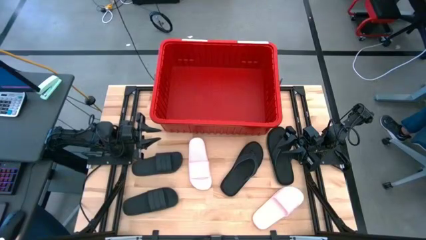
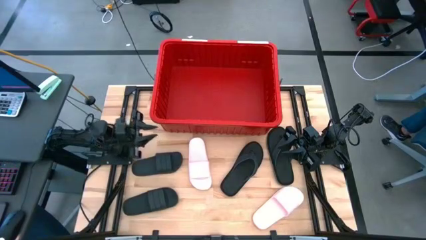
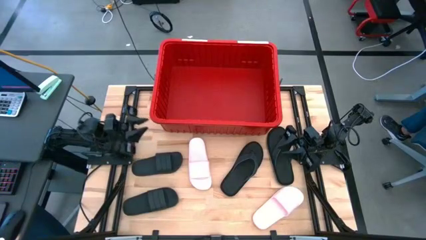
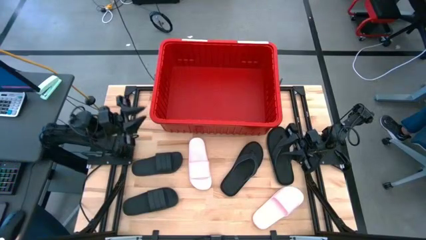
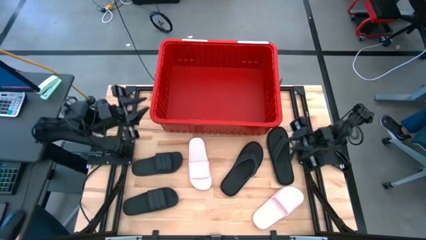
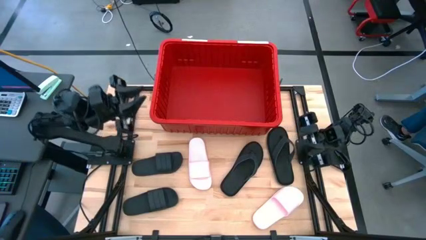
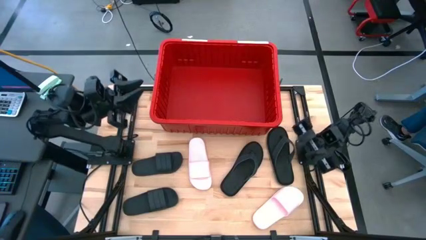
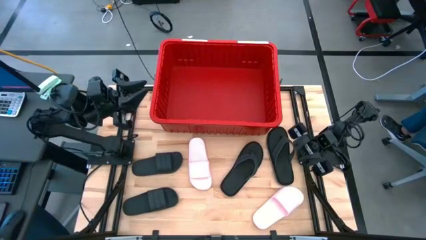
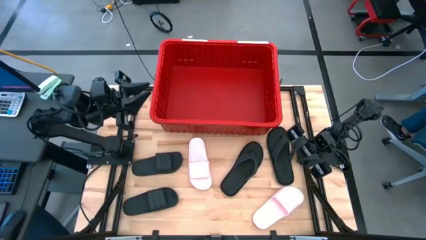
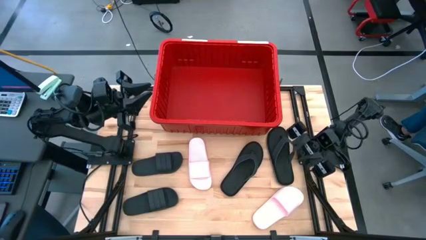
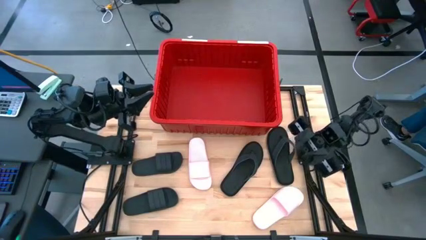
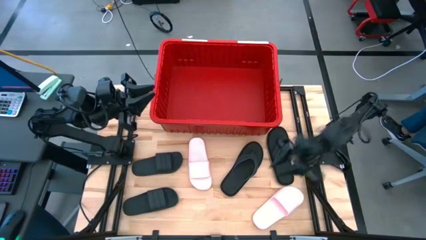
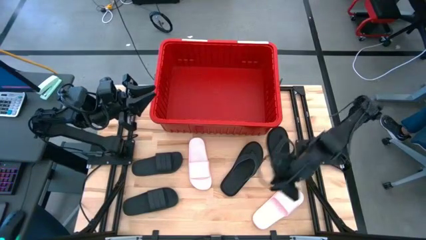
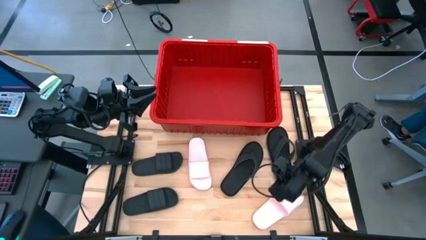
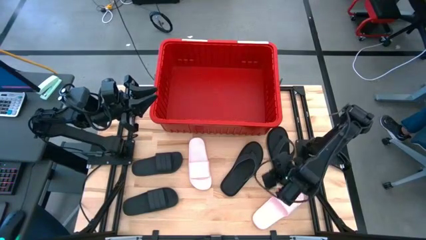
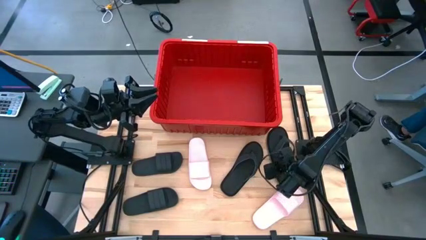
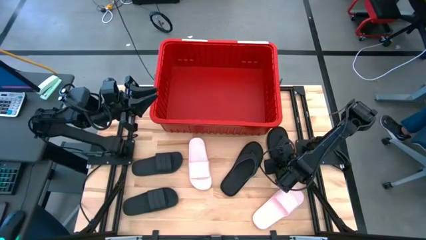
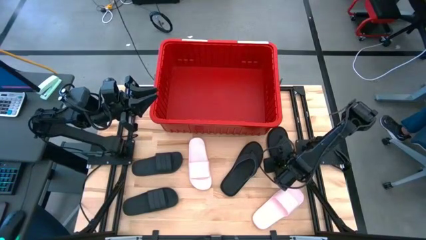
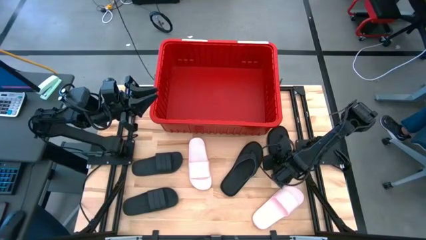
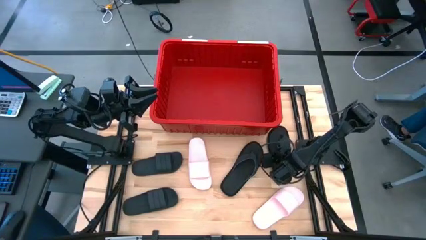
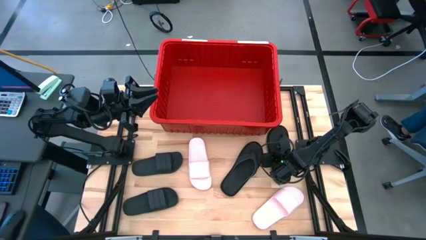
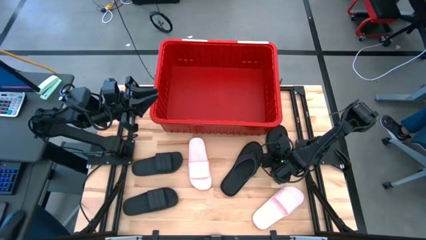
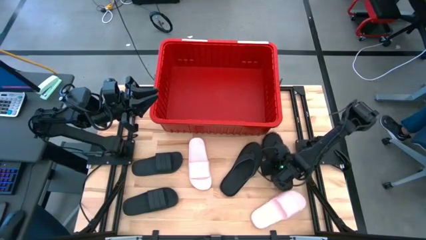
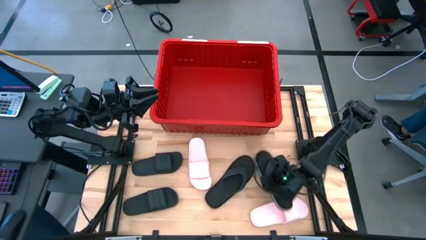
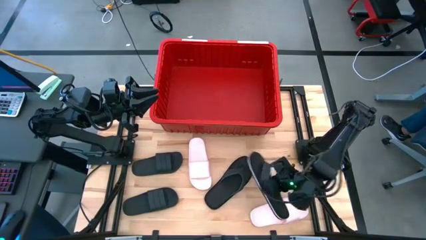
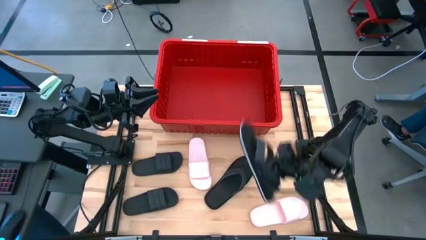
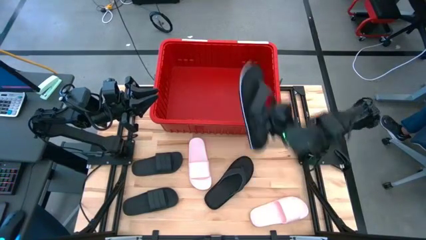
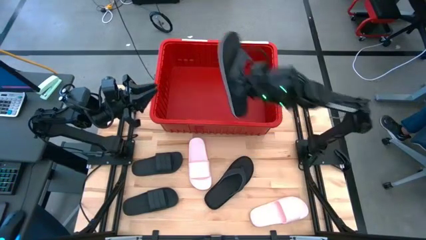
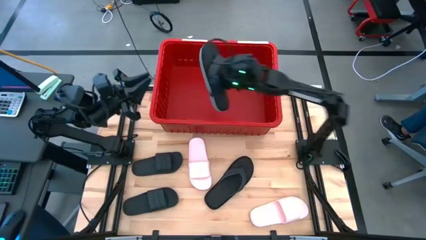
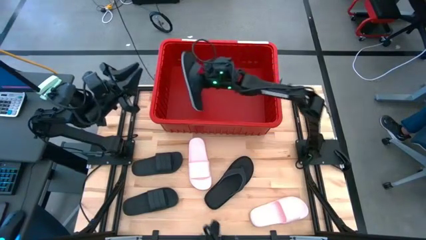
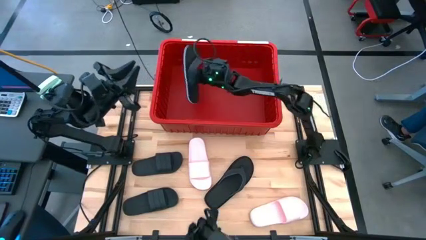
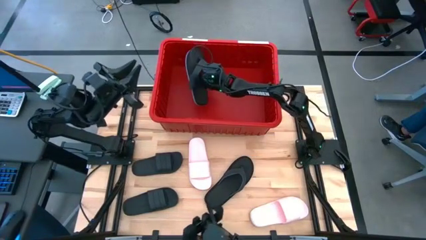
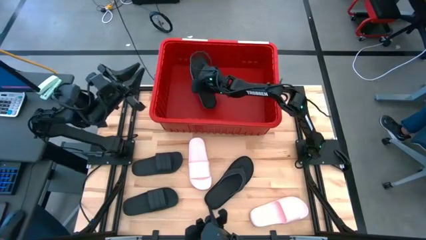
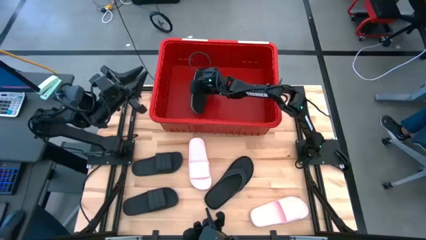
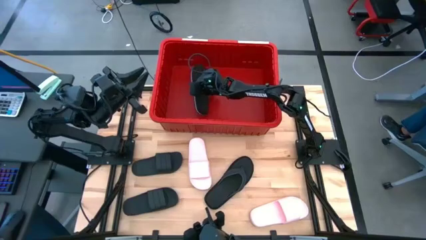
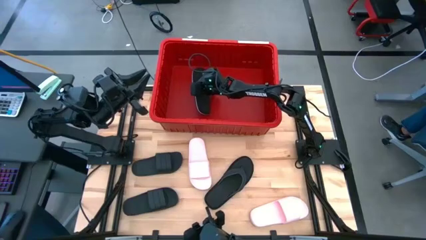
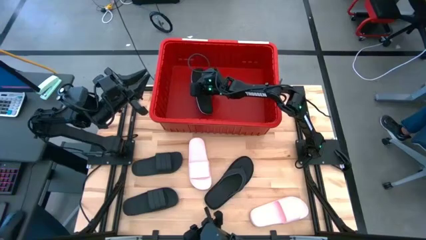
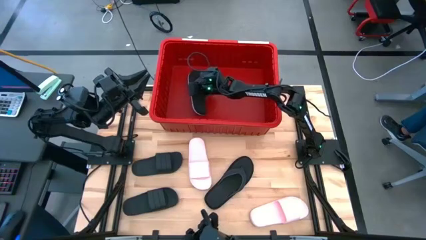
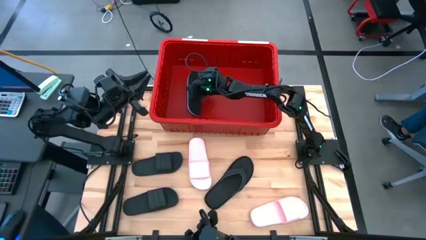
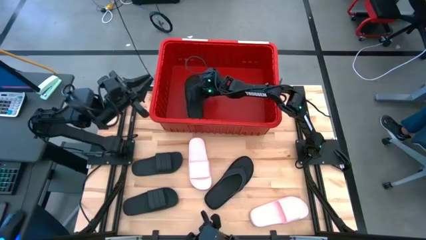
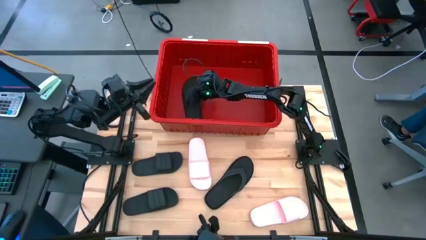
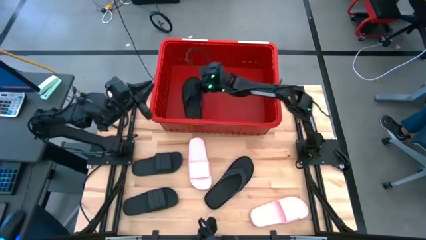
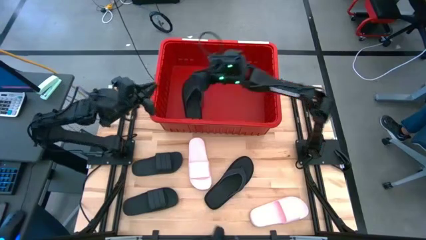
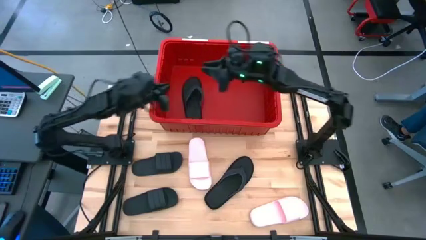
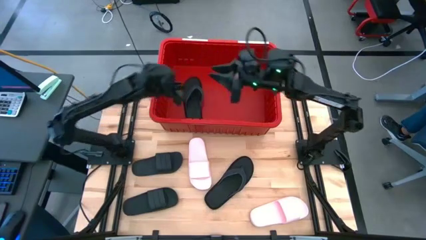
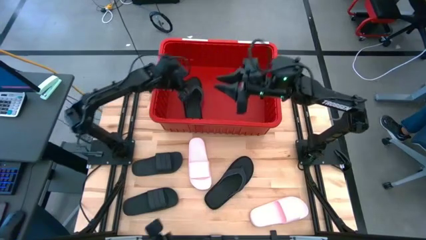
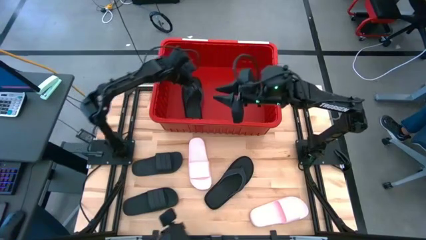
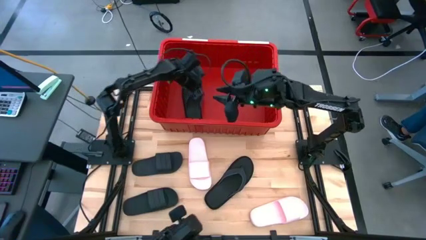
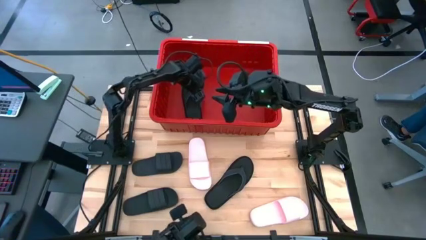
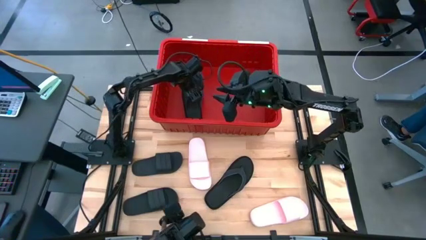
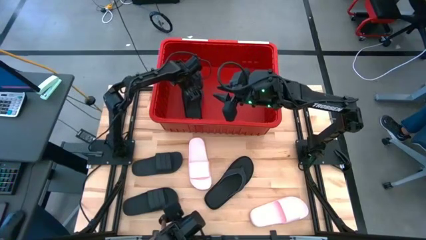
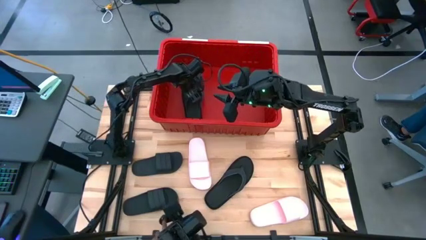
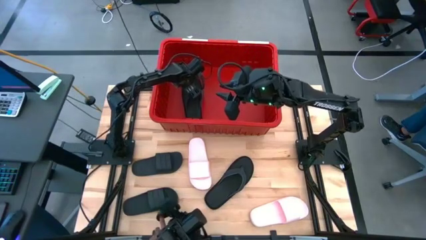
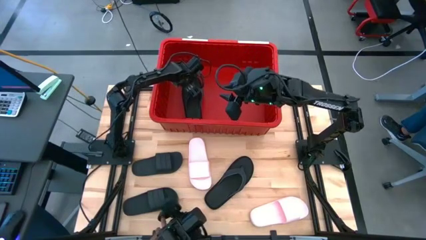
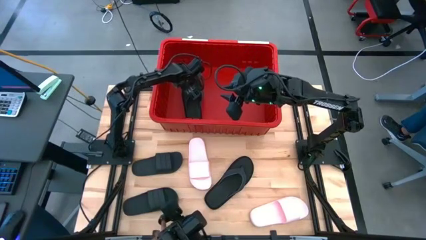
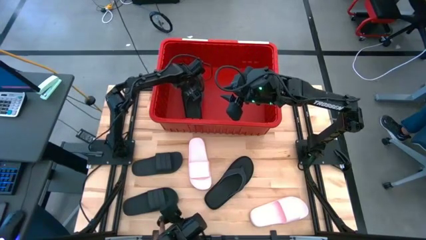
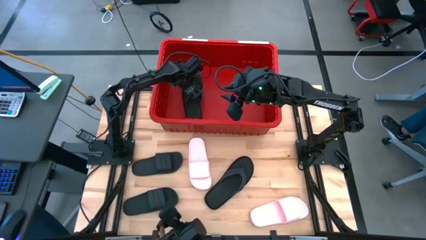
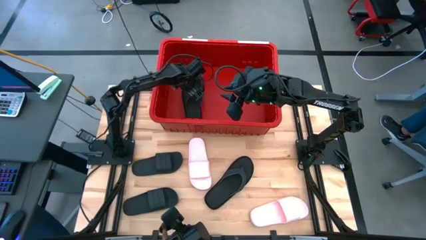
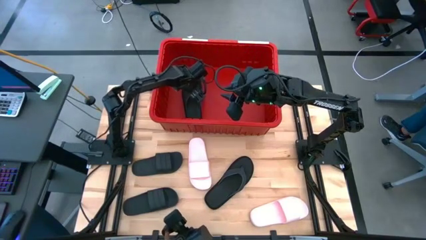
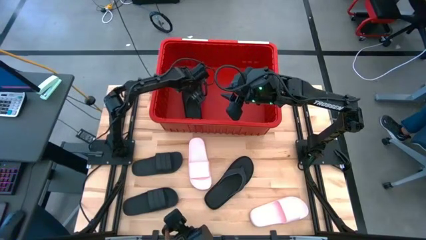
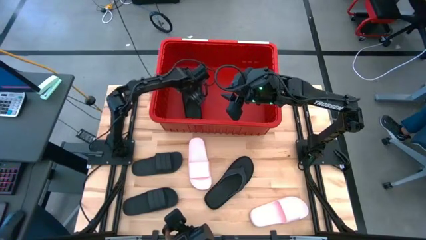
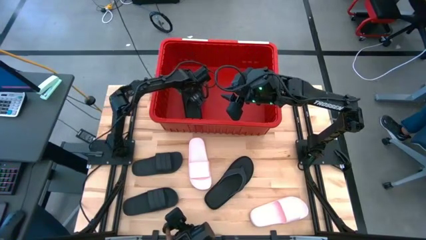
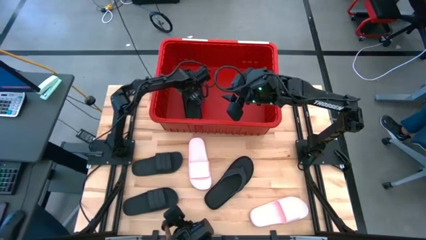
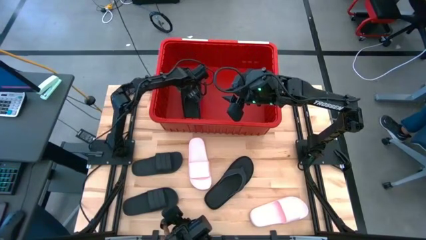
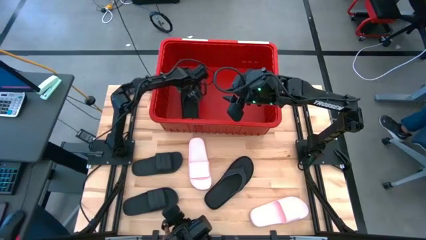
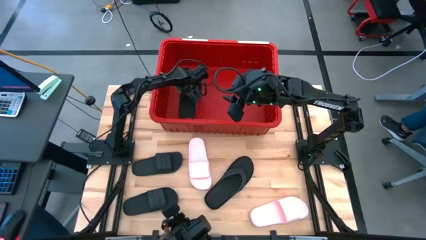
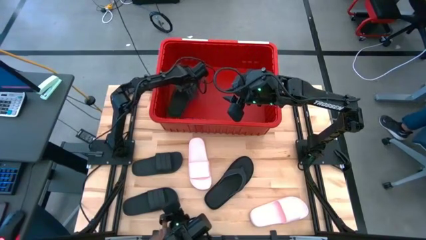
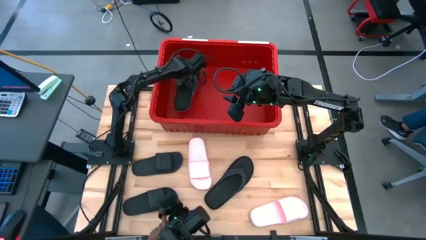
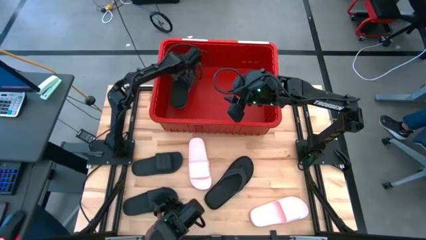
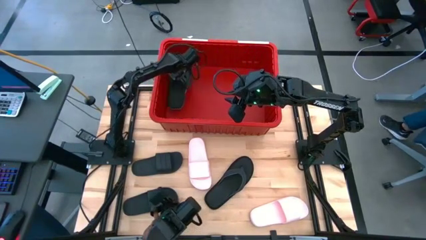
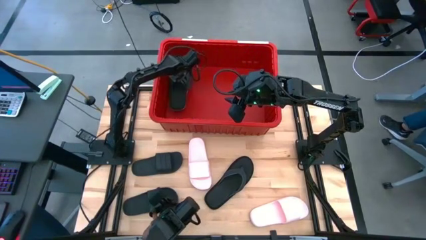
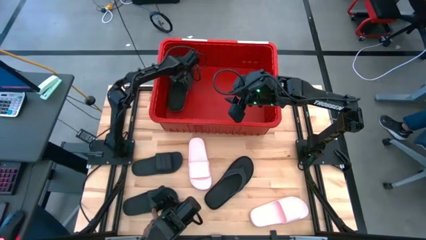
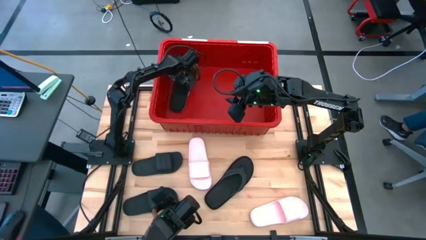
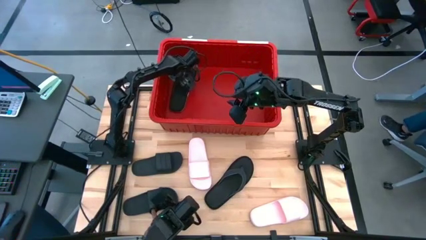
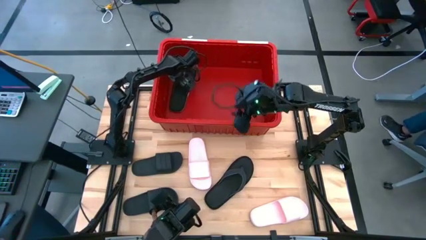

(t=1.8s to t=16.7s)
Task: Pick and place slides into bin
Put the right black slipper into the red bin
